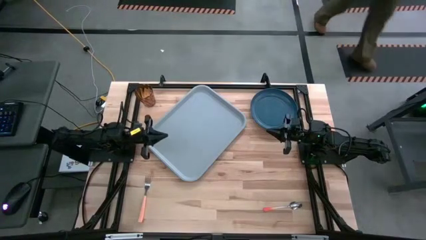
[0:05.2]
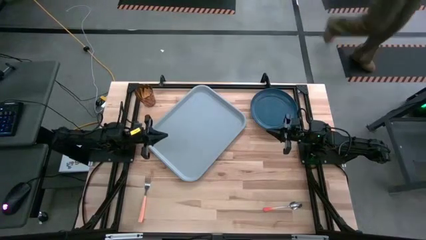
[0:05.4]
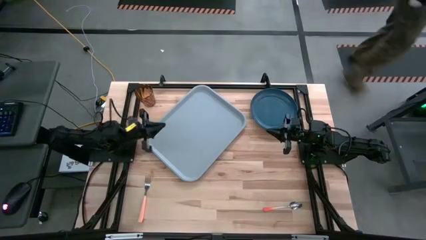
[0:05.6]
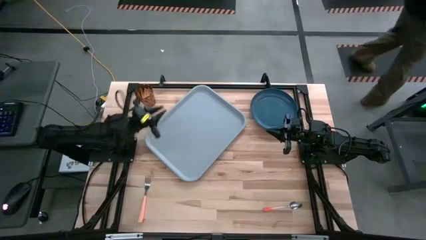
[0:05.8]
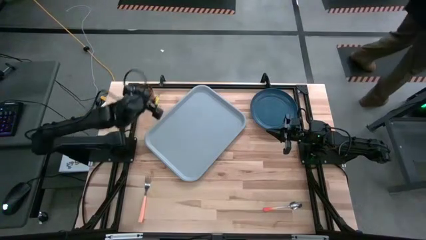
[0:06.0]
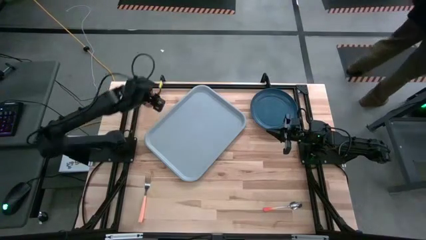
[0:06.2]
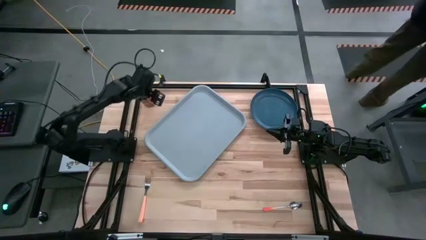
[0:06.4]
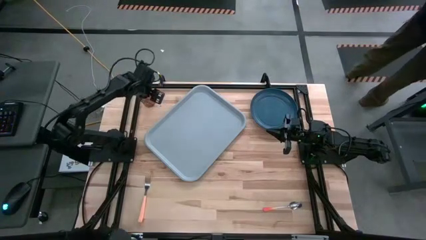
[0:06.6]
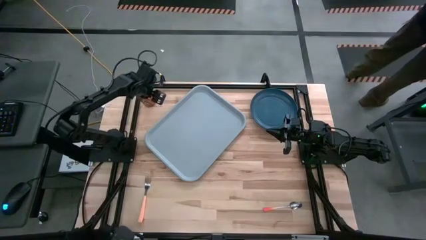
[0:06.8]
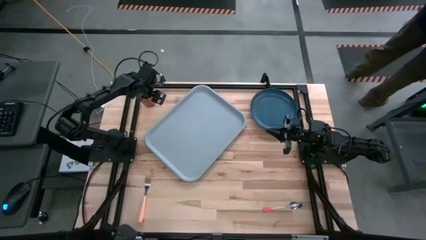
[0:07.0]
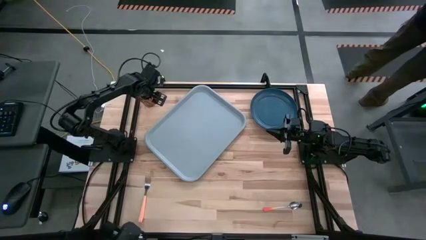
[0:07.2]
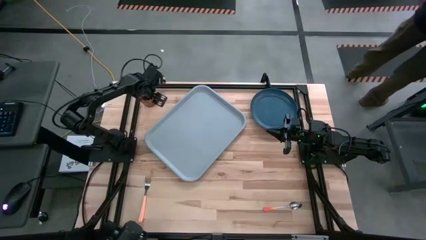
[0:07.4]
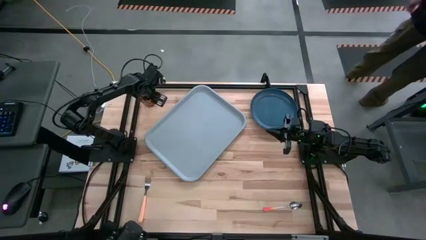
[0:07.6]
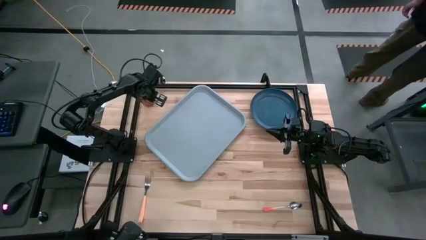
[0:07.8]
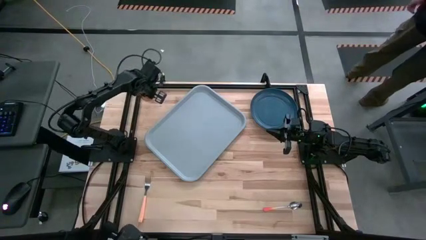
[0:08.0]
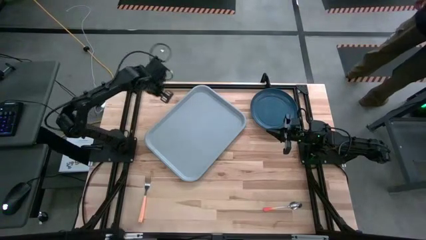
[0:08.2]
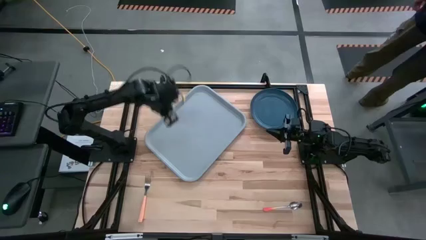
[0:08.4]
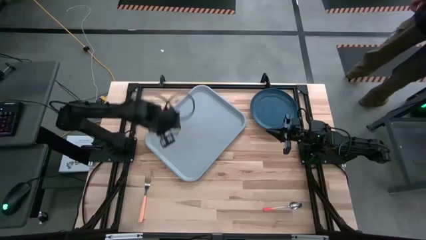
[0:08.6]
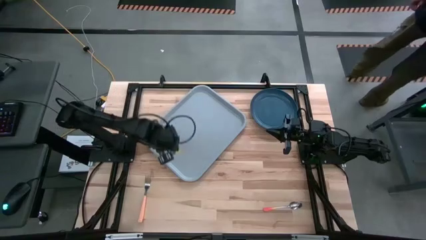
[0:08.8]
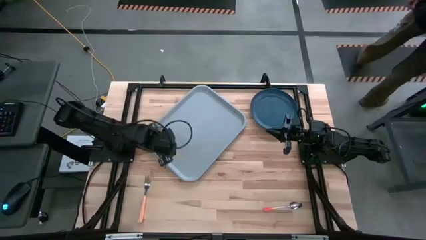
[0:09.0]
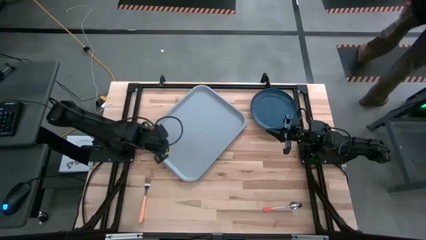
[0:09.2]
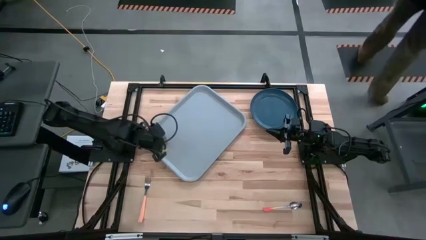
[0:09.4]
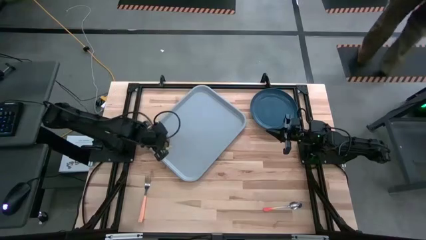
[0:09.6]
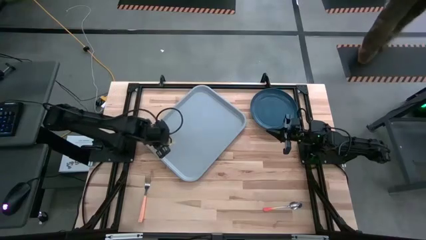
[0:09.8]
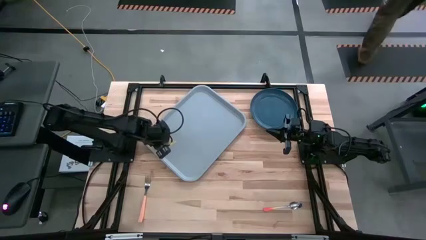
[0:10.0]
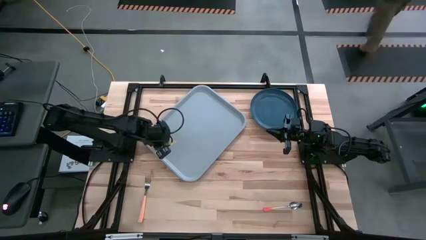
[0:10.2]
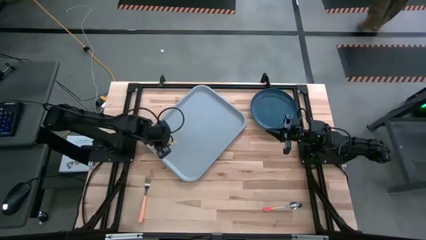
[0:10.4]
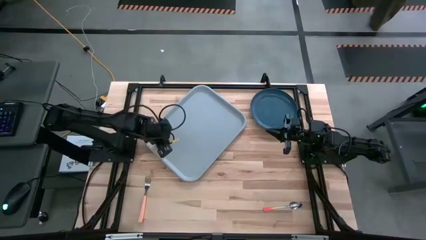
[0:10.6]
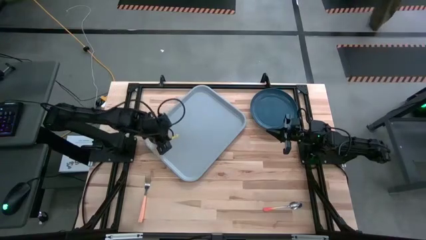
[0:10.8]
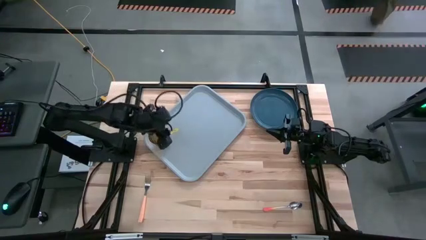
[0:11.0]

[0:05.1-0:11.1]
Task: Pick and place plate/cup/fork/spoon on tray
Put the brown cup on the tray

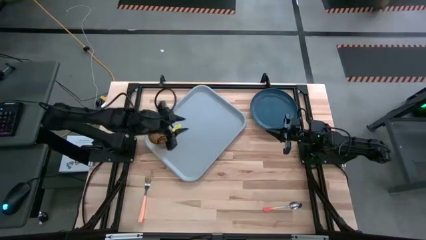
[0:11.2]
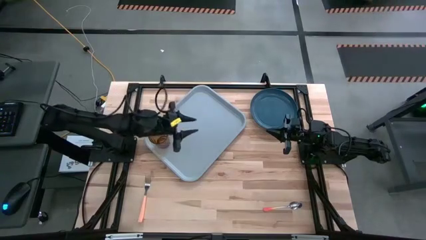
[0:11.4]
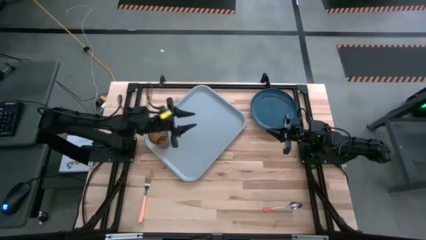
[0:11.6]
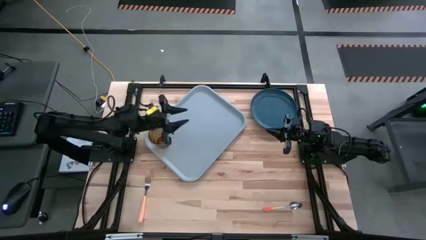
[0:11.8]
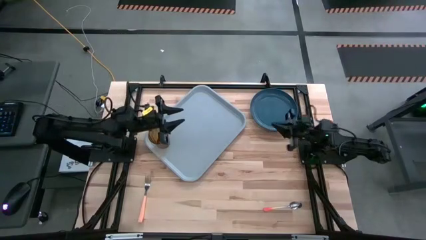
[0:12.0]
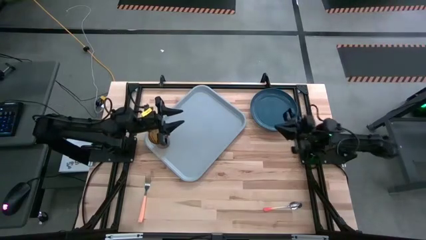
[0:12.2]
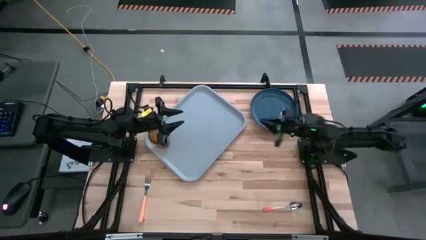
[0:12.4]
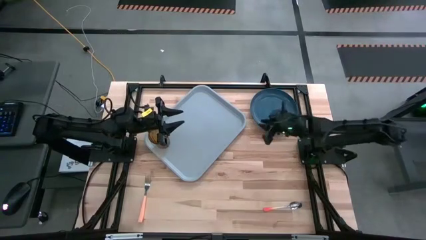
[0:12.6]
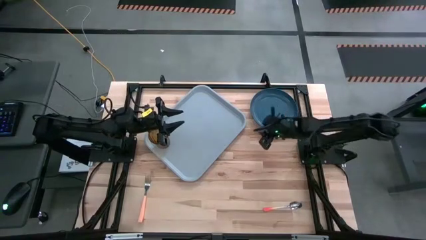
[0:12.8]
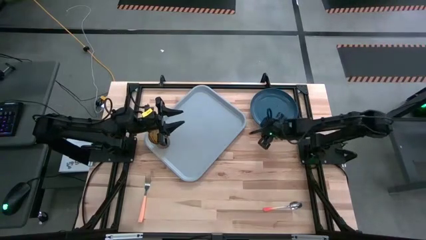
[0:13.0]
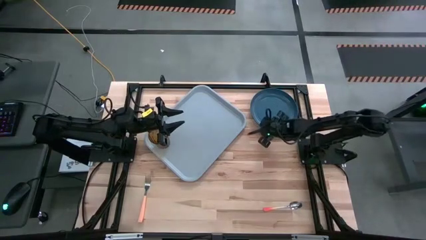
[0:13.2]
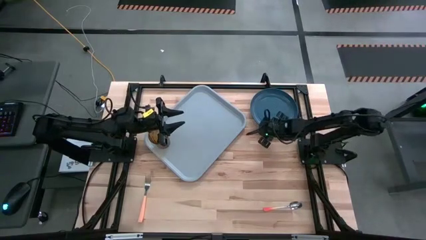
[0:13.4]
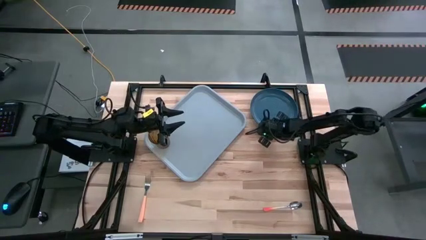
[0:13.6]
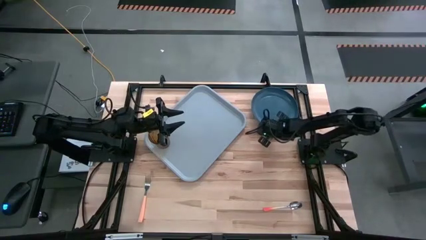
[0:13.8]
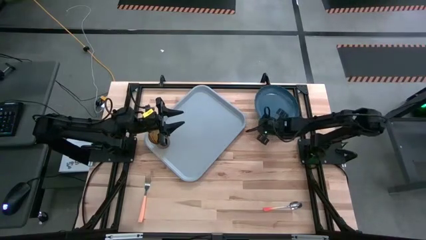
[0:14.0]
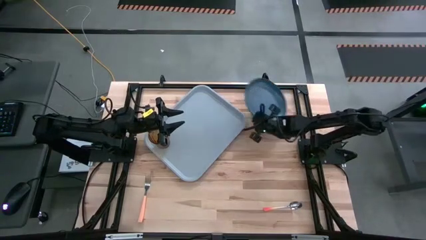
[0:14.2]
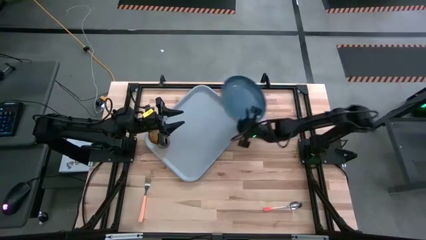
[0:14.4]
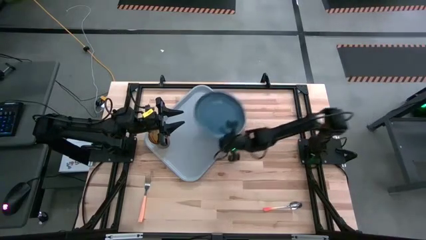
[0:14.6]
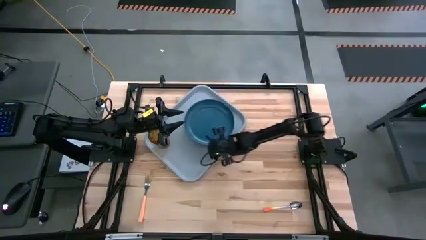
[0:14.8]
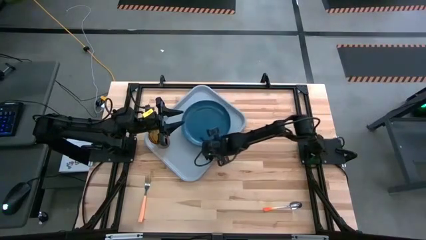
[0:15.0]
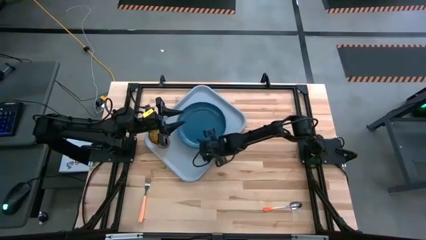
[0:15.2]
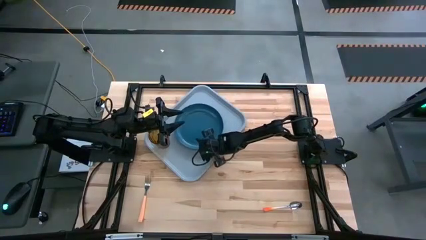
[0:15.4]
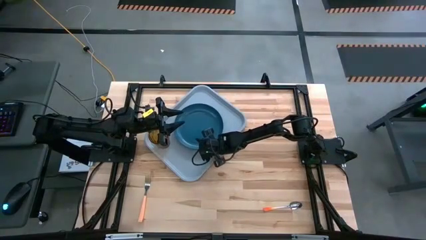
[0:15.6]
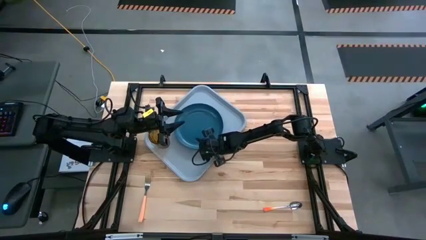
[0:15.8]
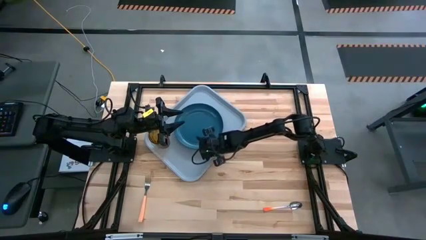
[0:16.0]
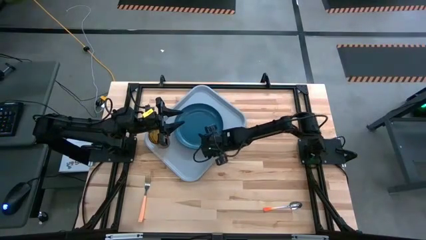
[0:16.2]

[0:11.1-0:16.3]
Put the dark blue plate on the tray

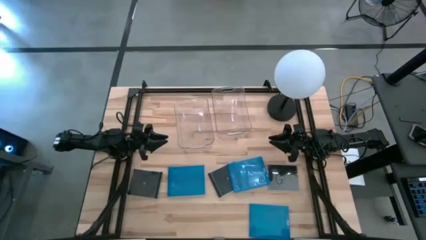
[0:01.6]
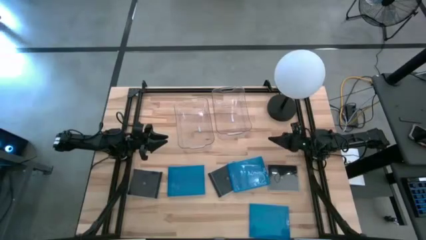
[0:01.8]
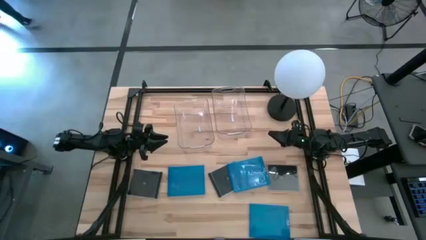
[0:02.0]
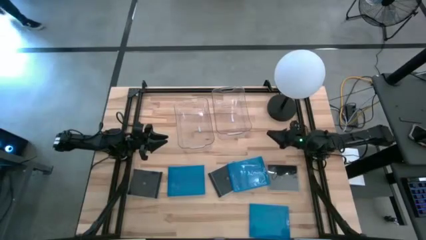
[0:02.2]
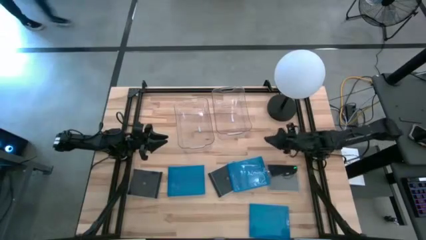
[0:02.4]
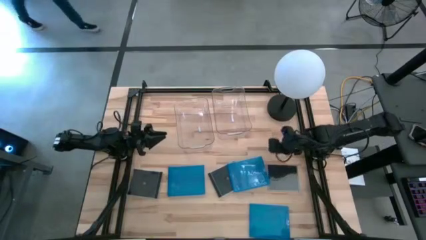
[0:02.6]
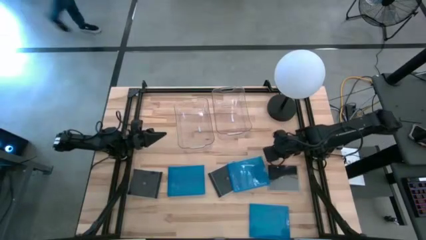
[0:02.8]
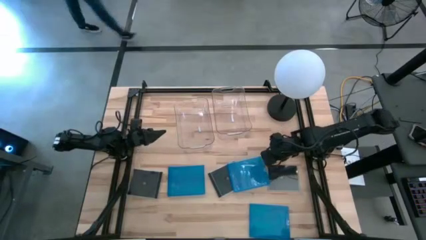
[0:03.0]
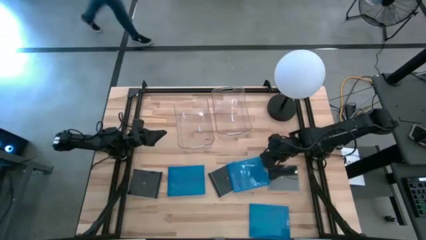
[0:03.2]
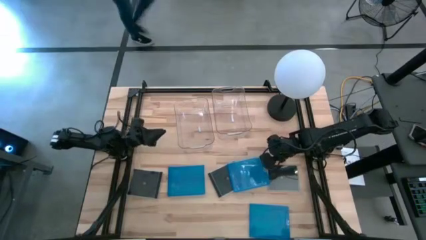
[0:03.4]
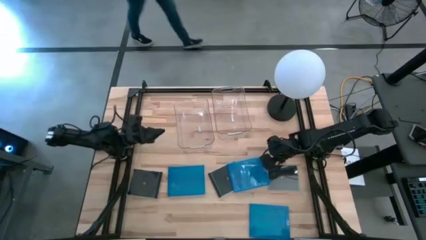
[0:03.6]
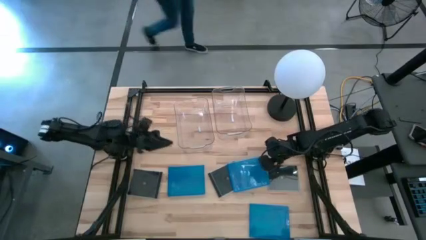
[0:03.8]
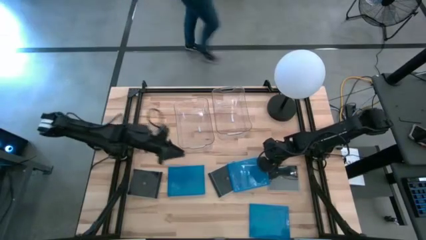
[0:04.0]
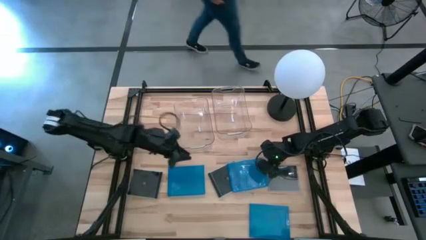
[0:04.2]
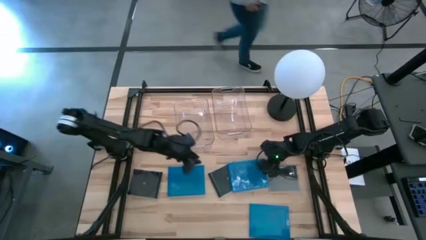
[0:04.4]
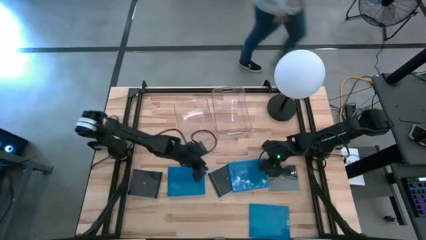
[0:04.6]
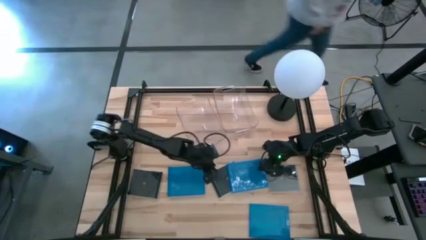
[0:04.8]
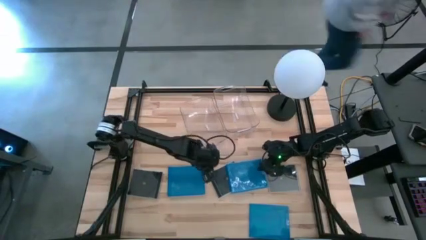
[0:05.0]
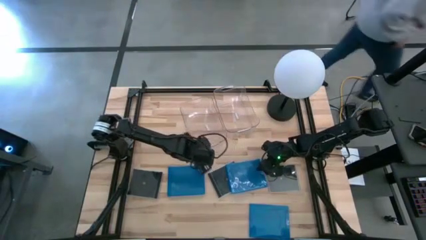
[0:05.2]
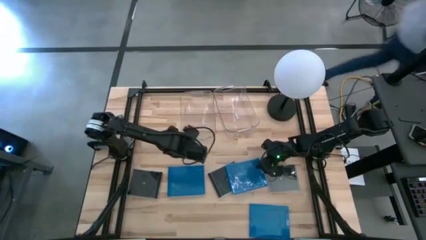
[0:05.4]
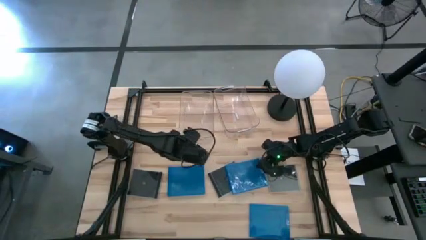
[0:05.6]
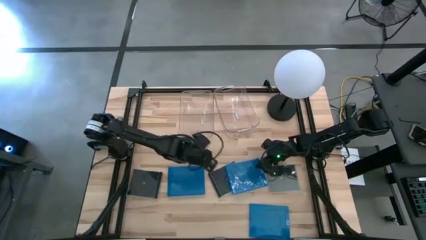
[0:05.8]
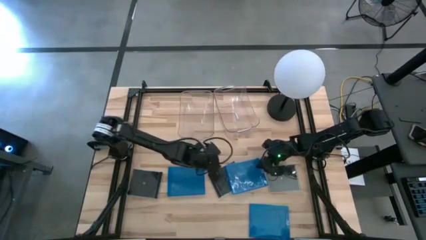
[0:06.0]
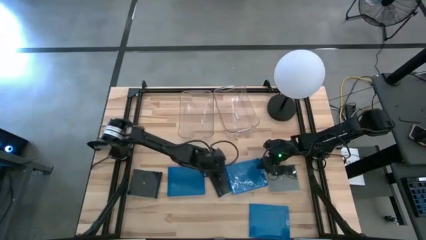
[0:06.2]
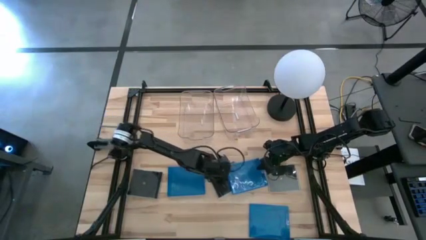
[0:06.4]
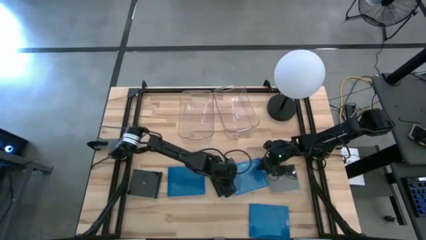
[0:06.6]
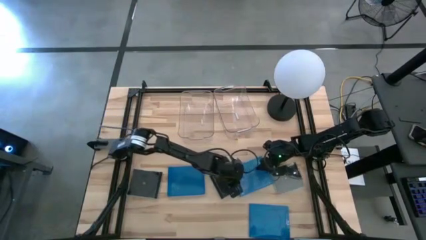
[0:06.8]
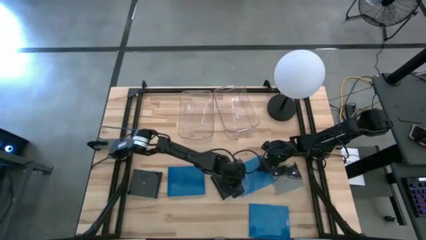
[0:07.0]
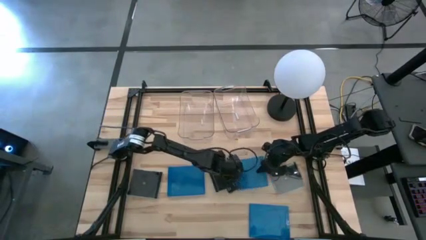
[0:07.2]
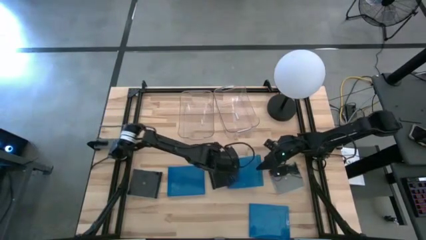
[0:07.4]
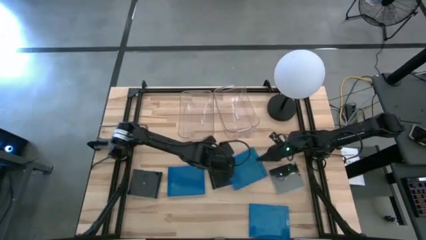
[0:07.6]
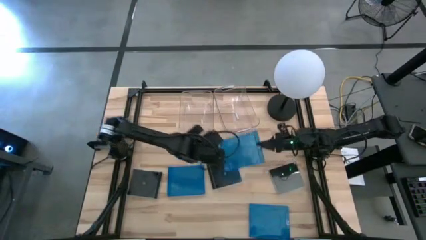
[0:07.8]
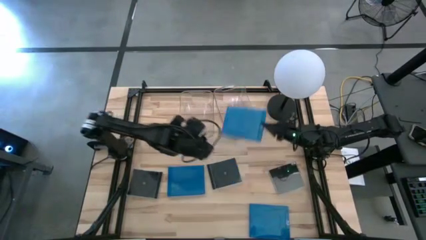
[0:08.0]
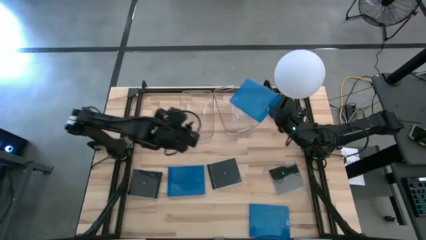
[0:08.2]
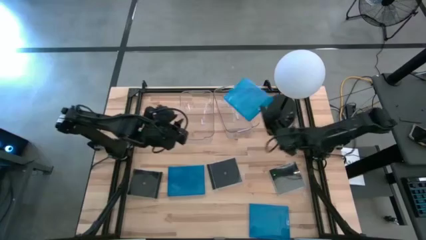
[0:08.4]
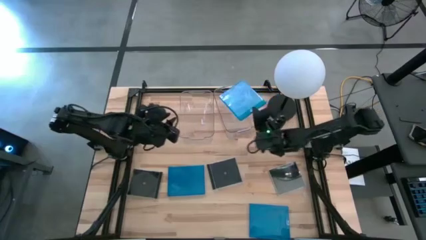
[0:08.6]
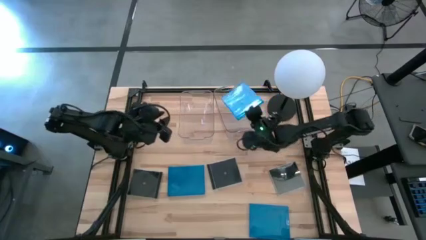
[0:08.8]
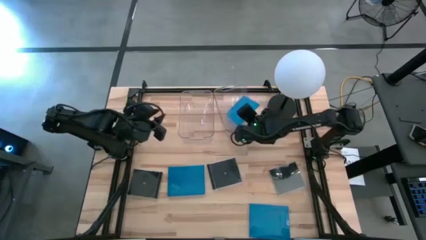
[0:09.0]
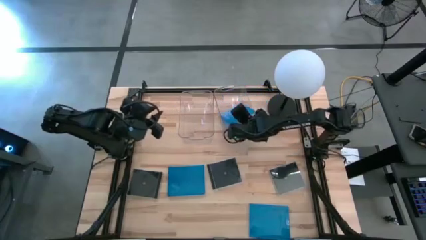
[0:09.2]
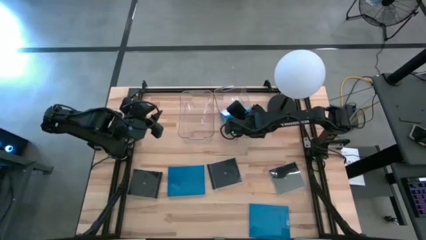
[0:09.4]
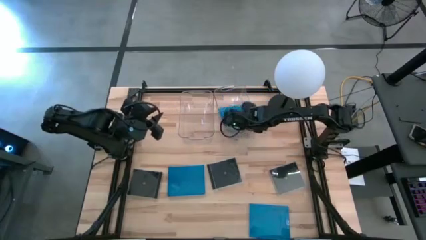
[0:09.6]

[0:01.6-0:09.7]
Task: Pick & place jewel cases by type
Put the right blue CD case into the right transparent bin
